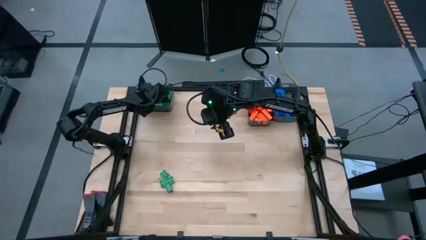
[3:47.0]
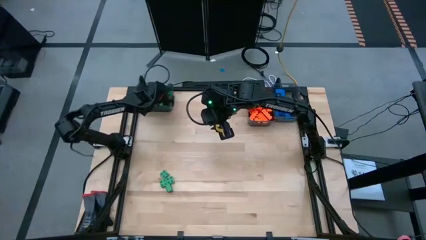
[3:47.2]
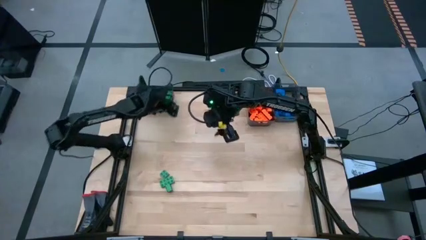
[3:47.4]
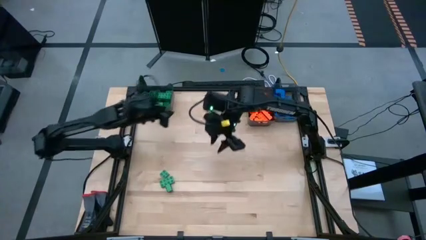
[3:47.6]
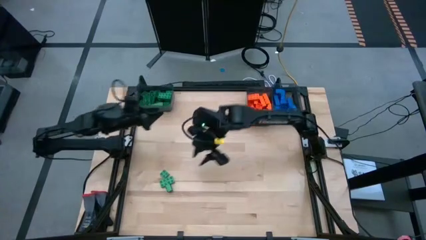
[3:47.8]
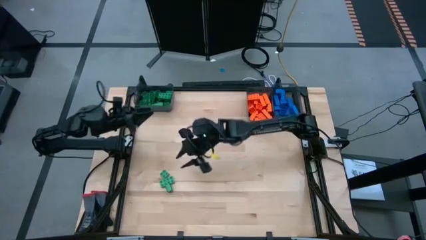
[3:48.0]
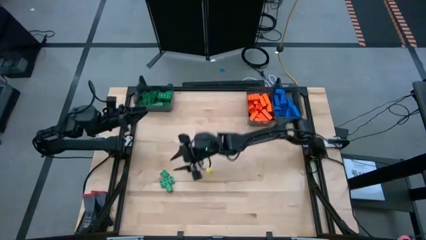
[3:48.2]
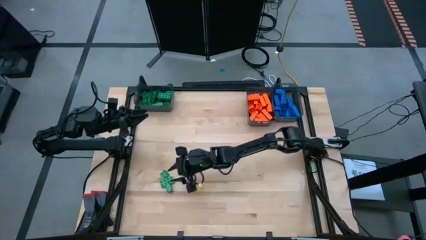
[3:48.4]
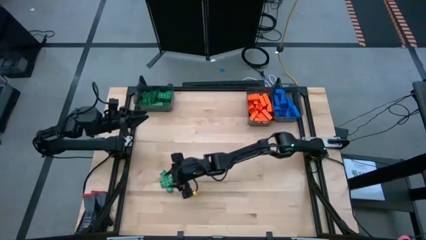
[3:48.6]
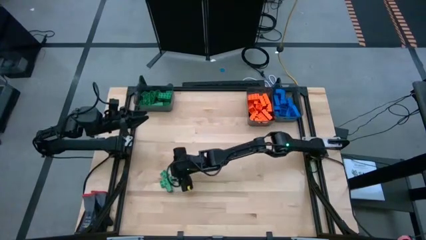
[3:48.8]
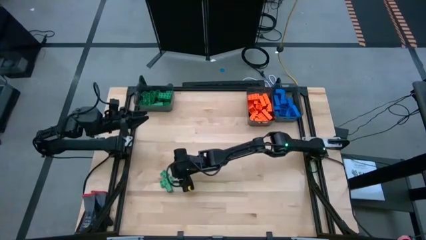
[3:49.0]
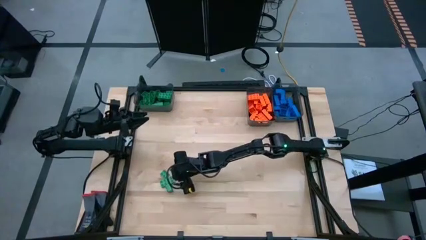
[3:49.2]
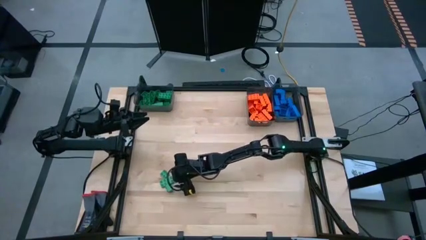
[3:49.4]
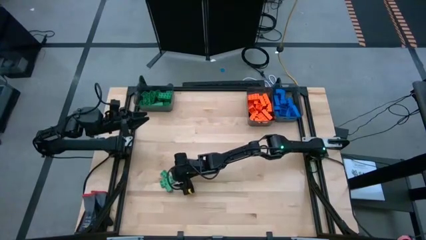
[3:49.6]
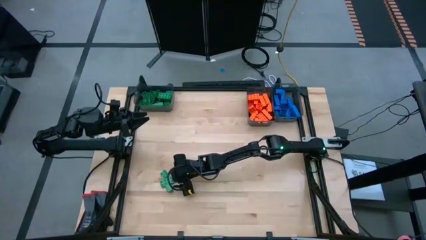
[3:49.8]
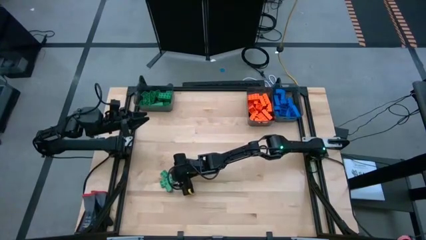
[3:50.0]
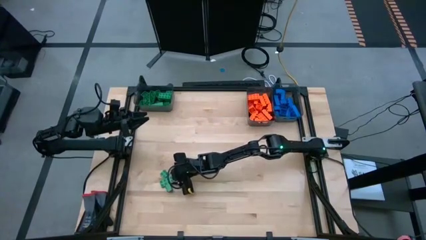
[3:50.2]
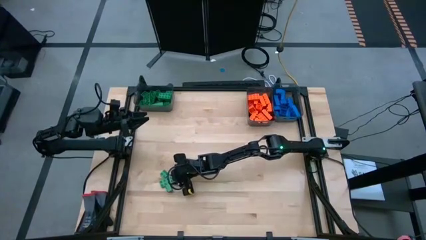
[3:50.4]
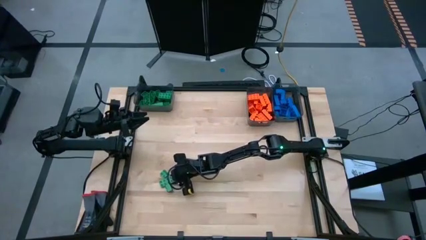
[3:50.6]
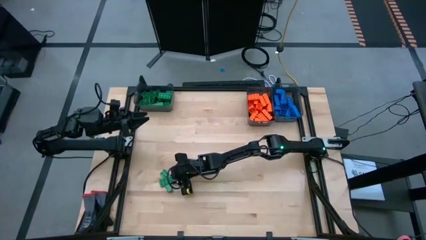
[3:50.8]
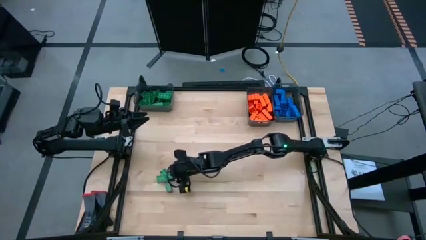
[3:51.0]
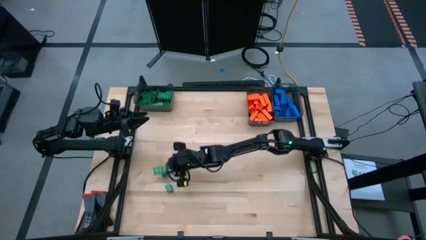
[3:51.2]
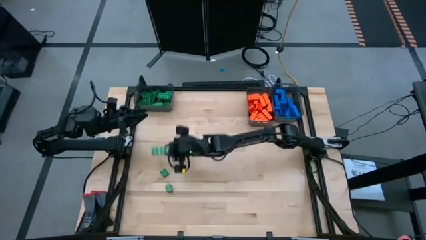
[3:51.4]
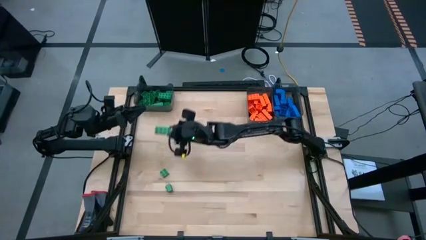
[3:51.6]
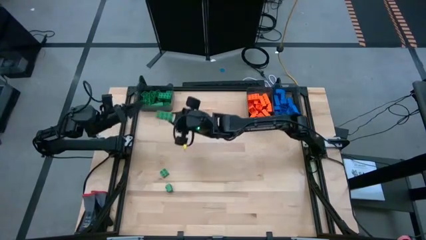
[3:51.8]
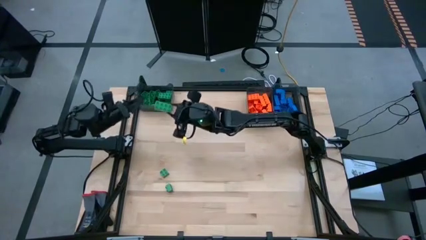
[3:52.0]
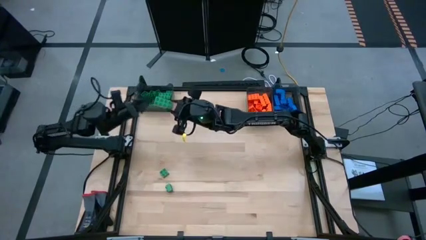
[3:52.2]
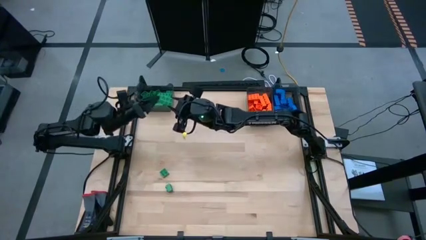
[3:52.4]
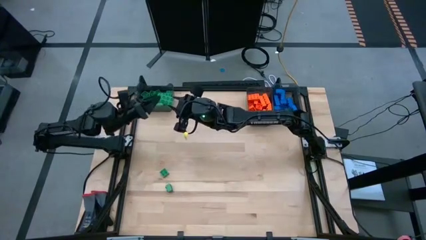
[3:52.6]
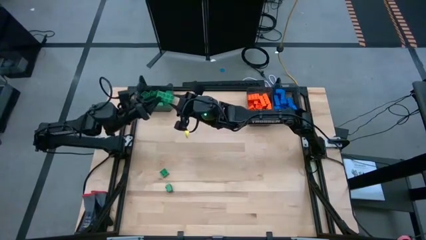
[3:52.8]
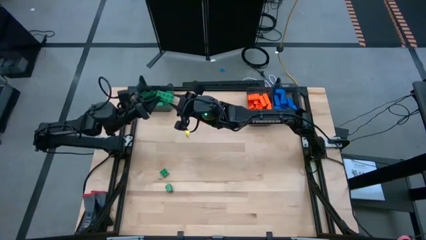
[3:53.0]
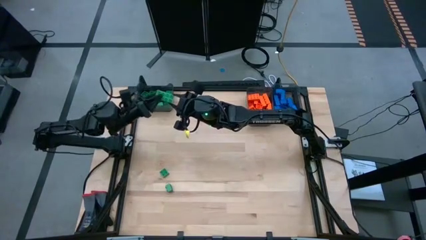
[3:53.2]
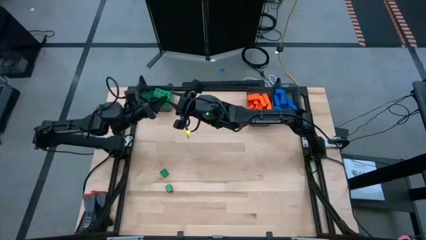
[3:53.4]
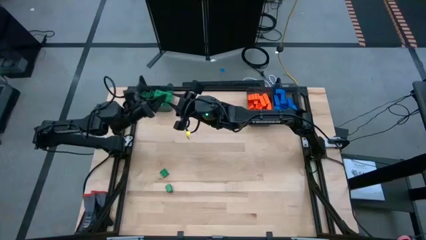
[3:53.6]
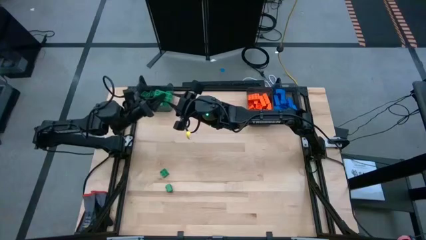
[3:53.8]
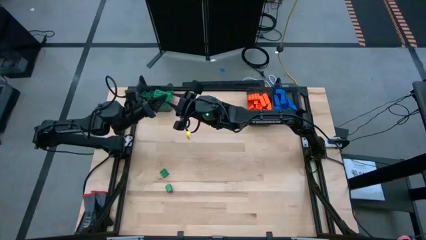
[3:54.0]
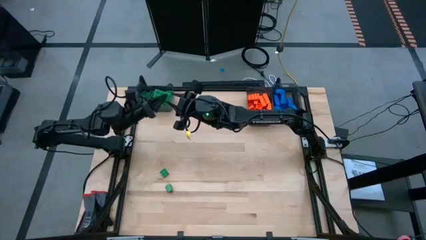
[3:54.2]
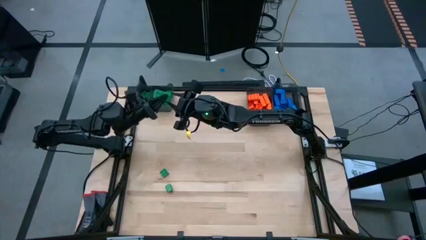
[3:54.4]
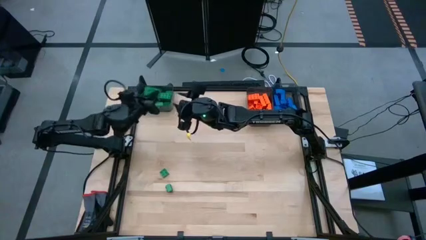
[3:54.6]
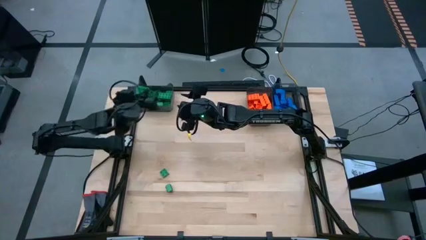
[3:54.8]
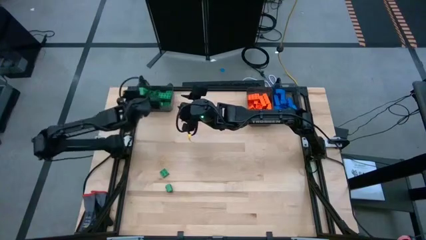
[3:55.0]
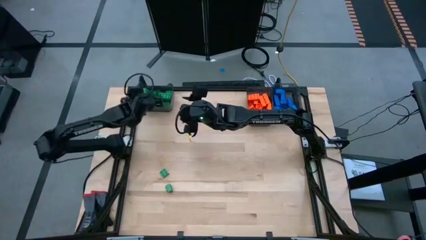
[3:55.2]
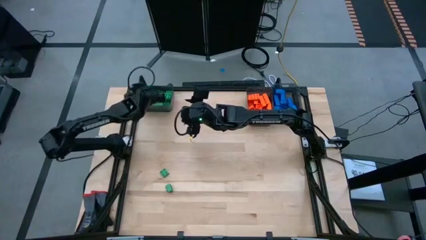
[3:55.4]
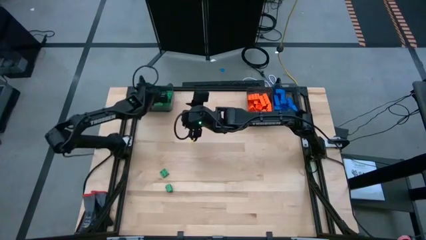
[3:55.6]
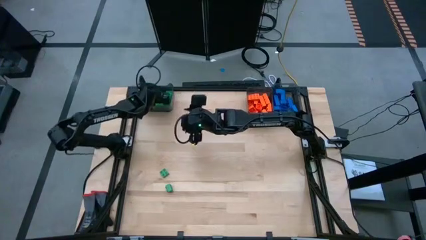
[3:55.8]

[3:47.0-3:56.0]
Task: Sort blocks
Put the green game piece into the left black bin

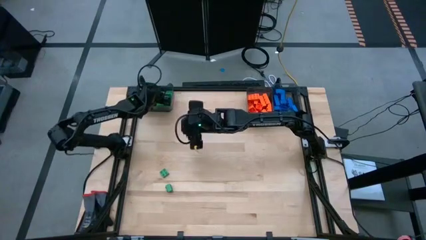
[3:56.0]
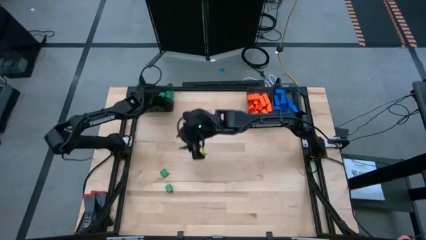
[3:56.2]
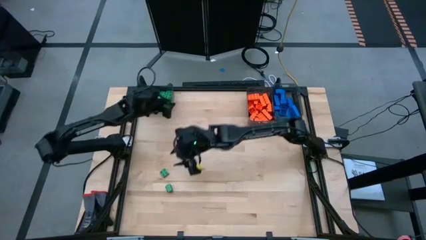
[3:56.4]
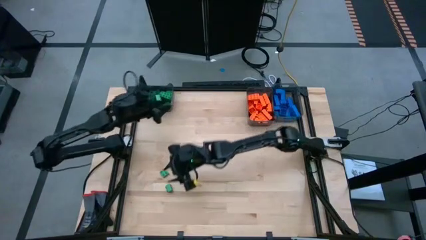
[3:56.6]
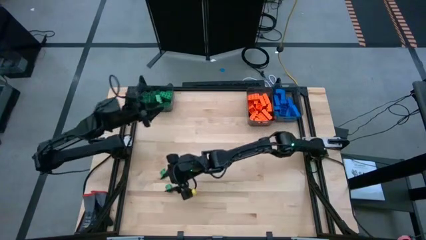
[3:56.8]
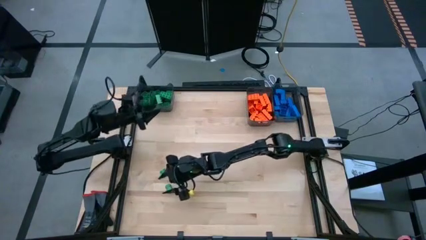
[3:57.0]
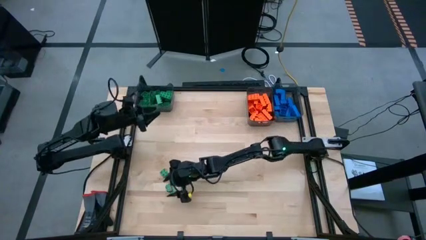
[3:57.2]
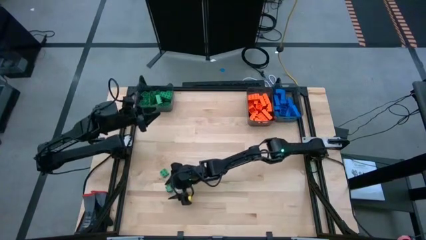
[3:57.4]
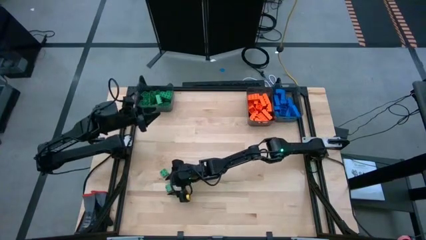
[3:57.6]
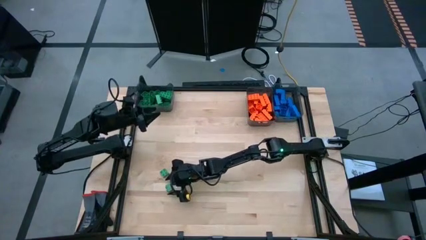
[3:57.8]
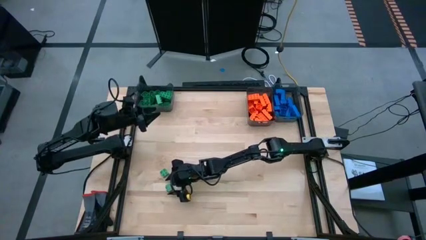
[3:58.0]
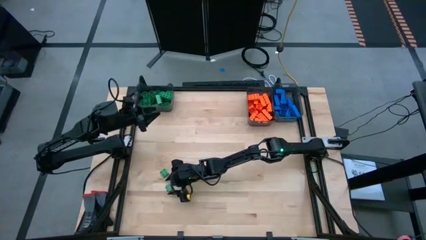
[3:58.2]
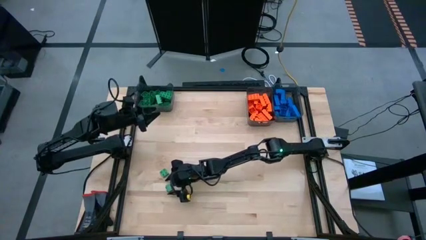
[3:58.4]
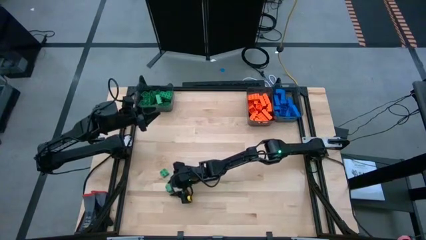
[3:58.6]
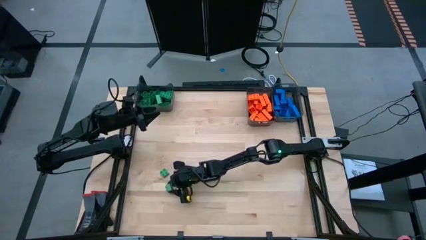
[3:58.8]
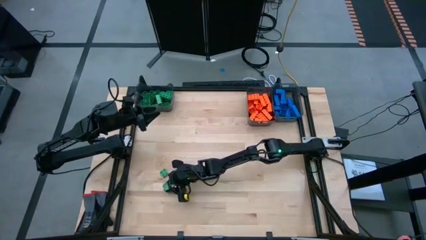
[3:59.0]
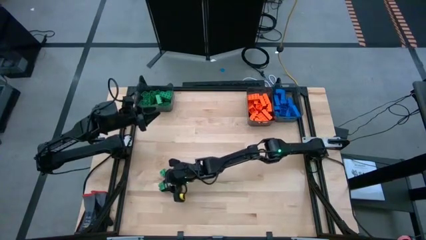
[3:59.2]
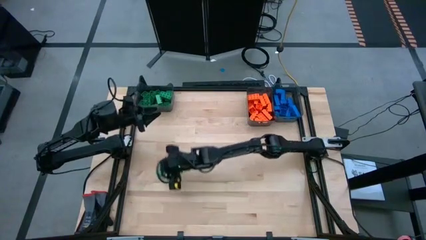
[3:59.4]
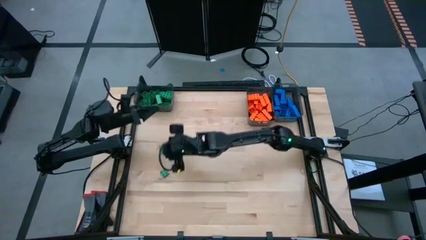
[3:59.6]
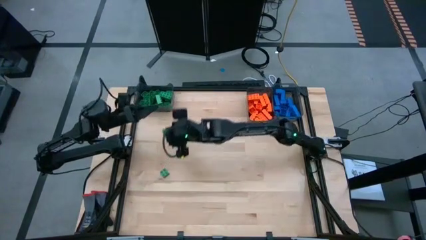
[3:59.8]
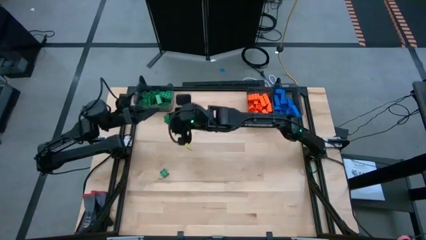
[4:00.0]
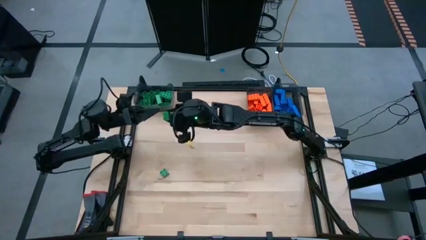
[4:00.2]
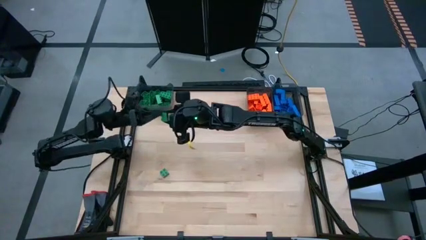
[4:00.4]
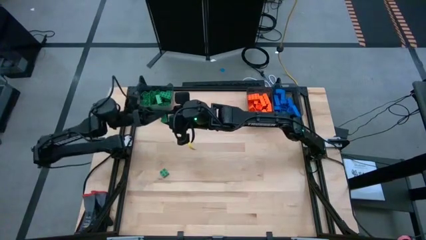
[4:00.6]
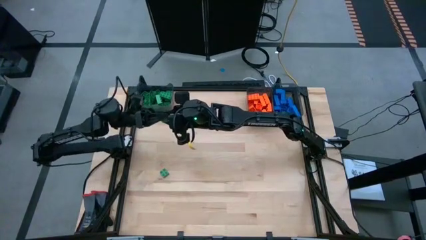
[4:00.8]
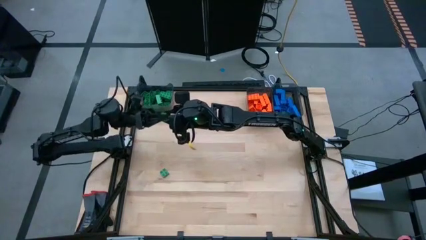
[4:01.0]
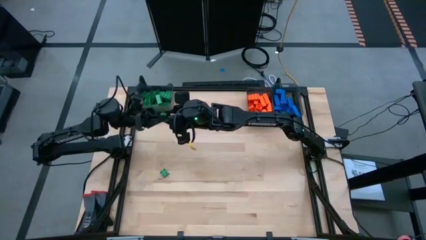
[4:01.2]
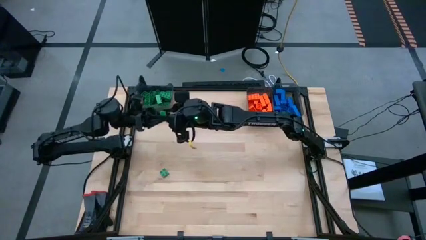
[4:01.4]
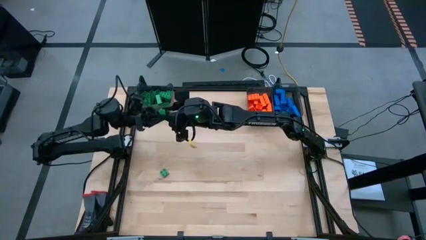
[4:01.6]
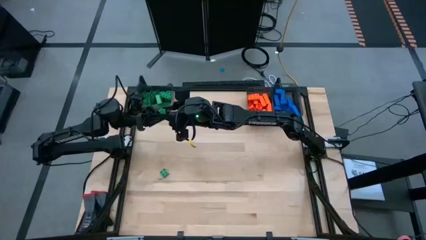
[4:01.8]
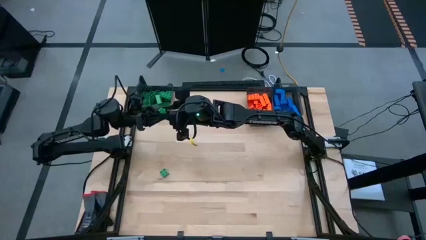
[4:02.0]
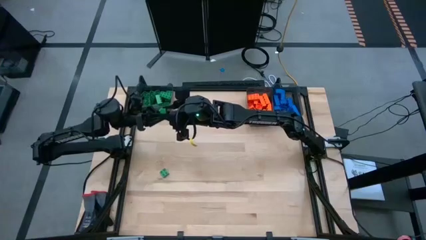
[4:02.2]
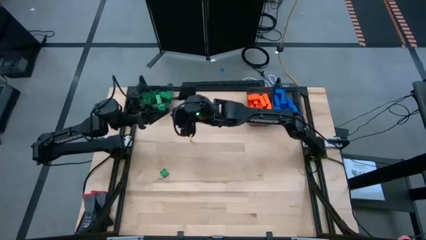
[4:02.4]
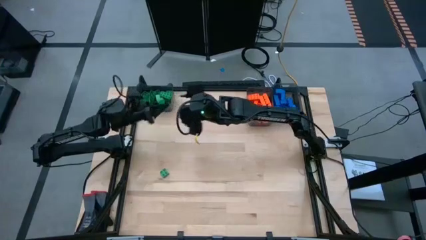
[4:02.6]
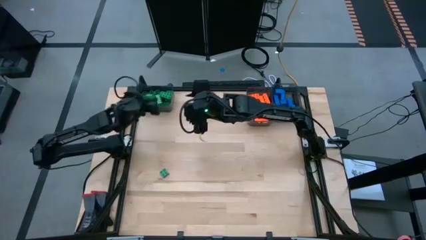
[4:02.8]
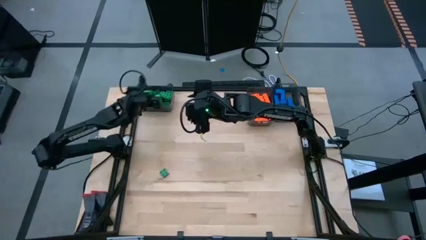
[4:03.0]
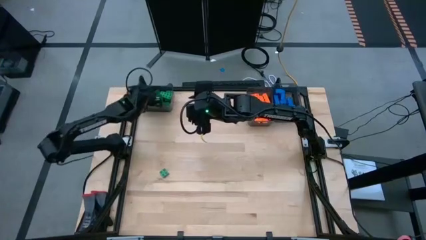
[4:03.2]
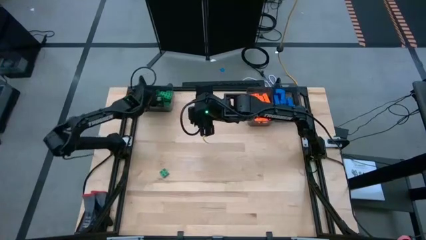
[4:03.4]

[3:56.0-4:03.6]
Put the green game piece into the left black bin
